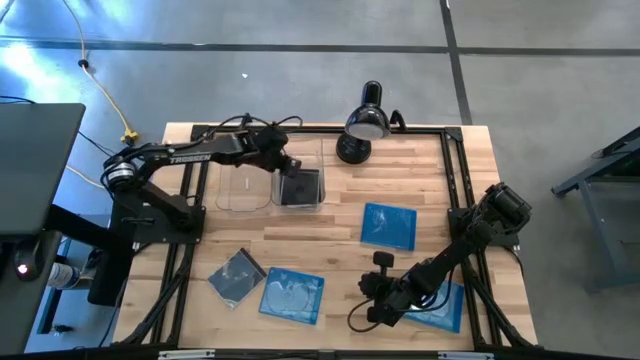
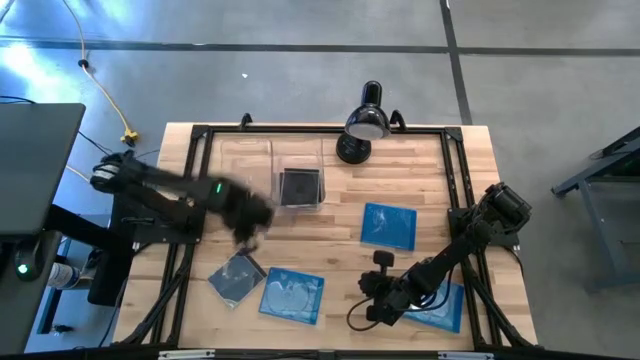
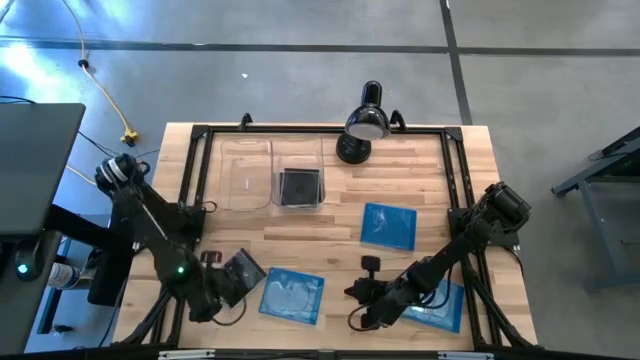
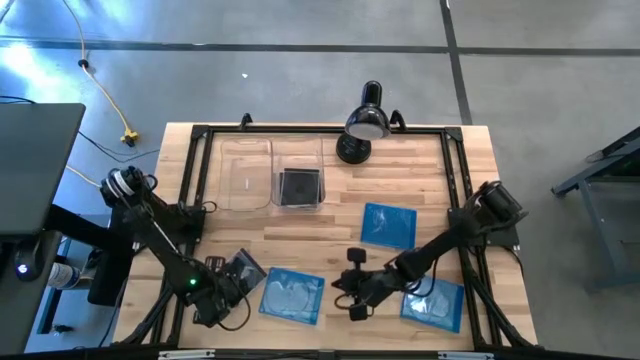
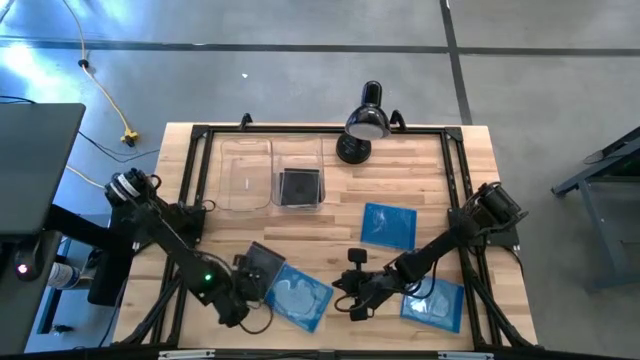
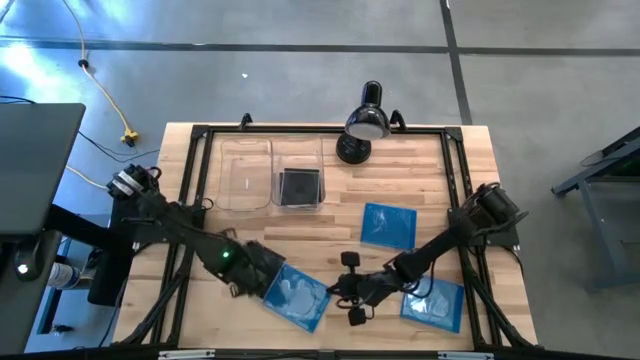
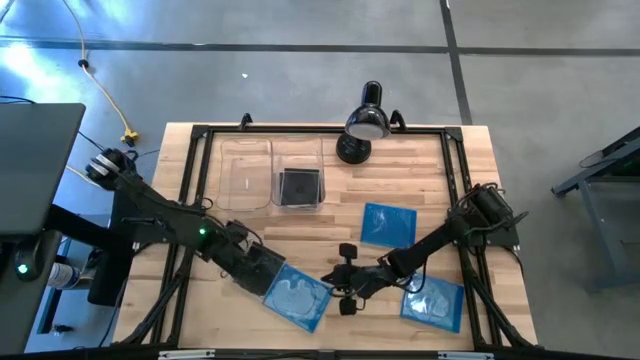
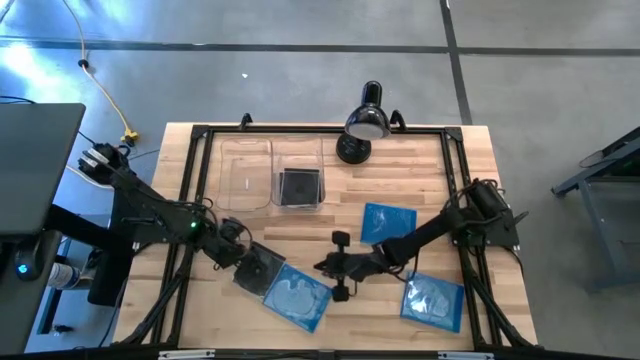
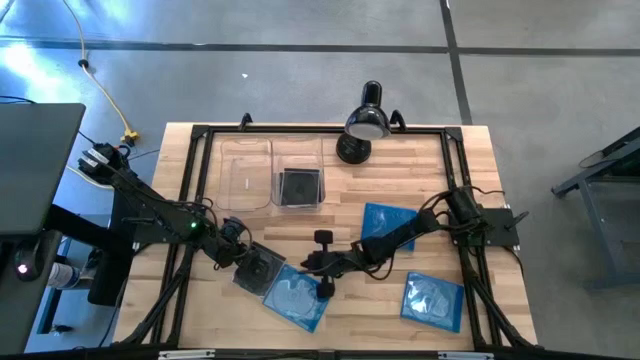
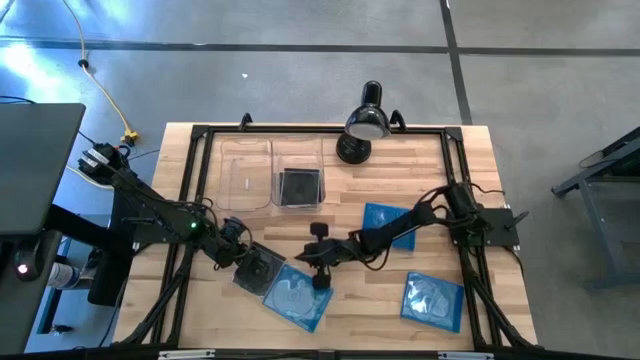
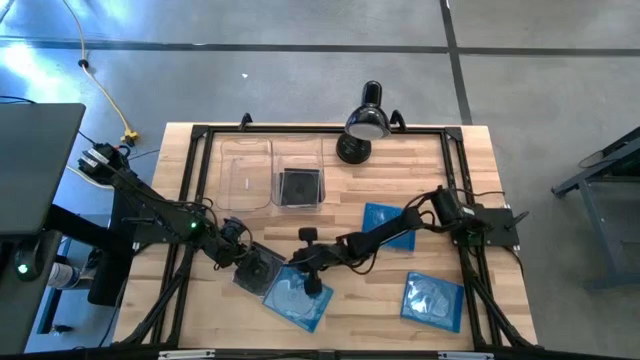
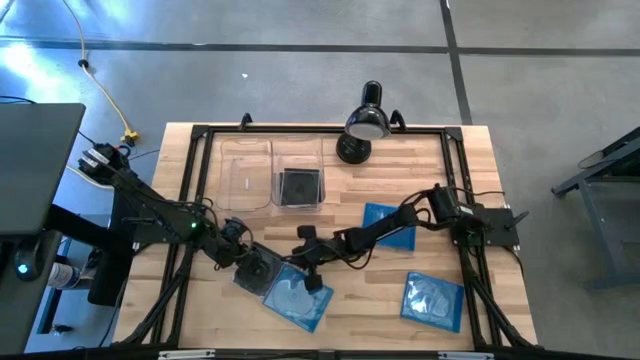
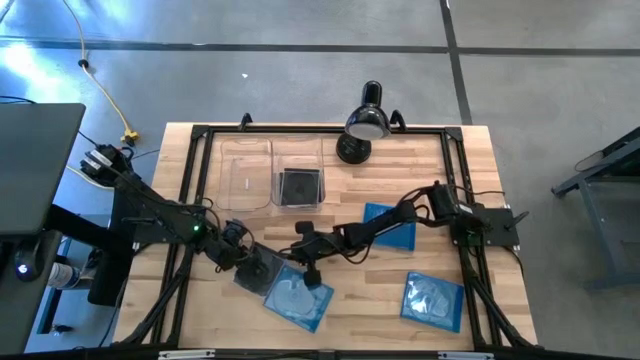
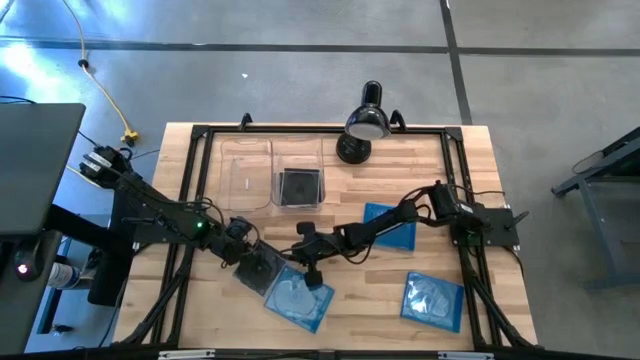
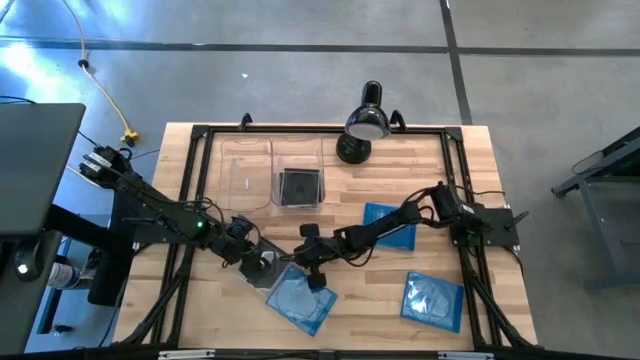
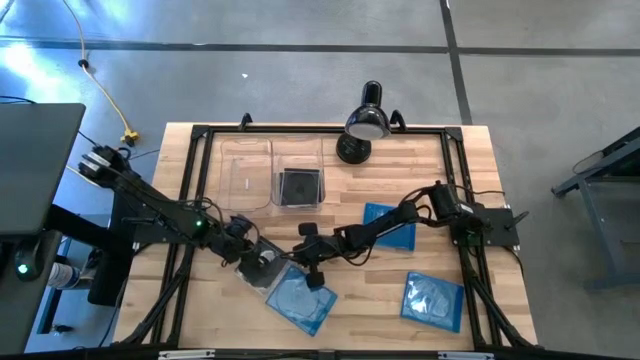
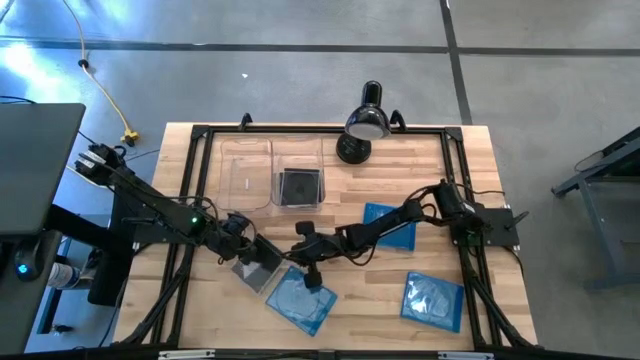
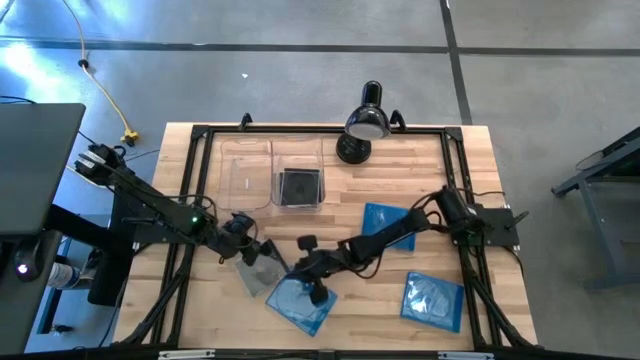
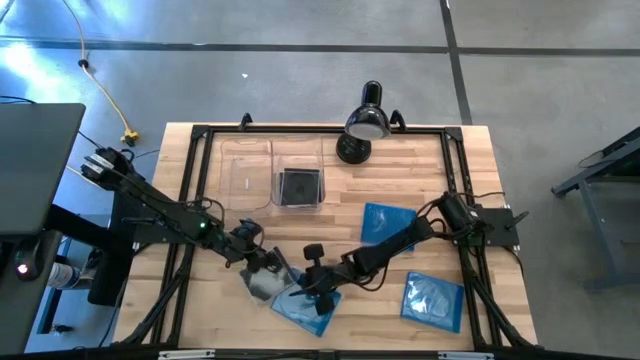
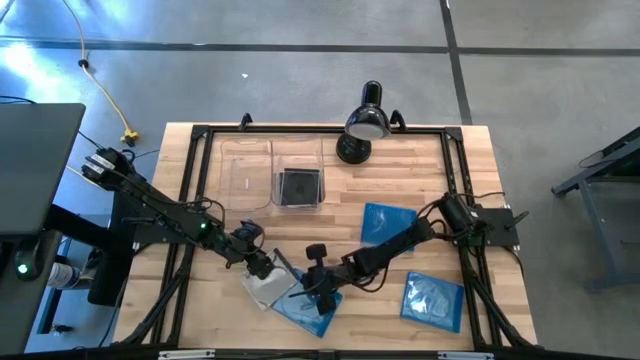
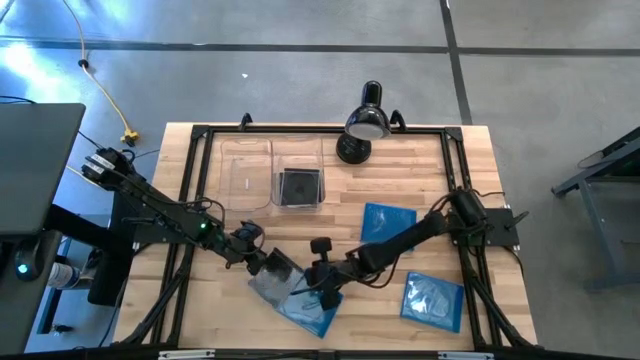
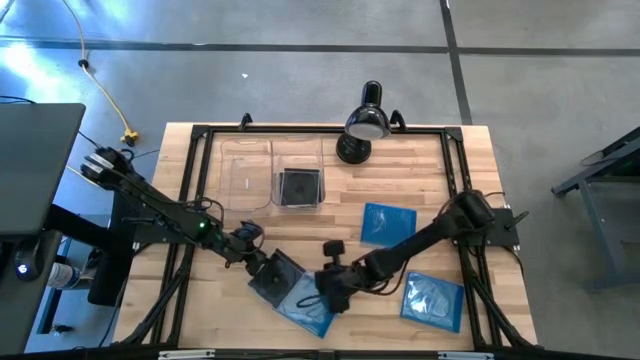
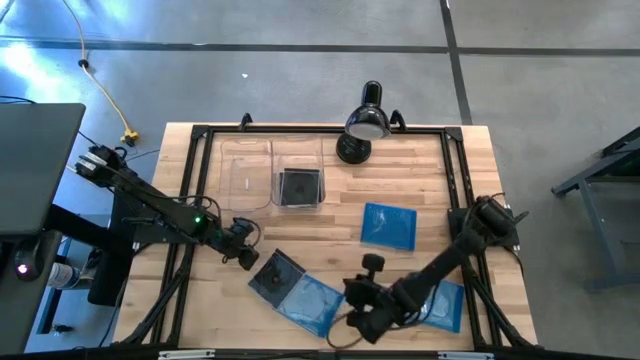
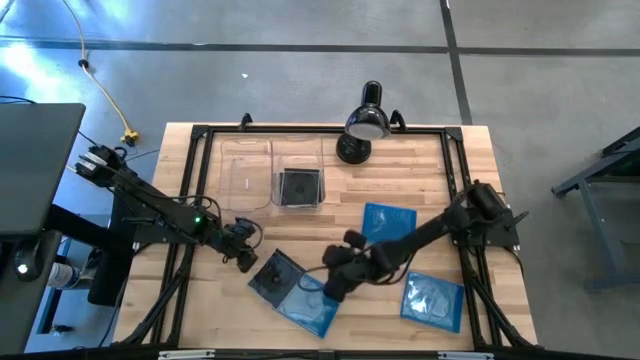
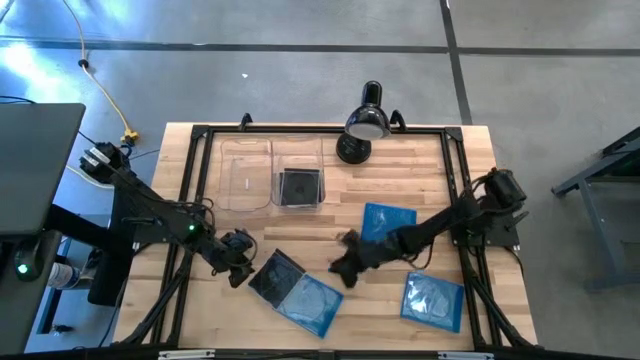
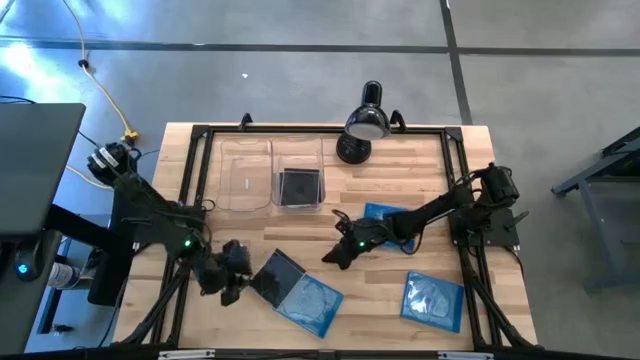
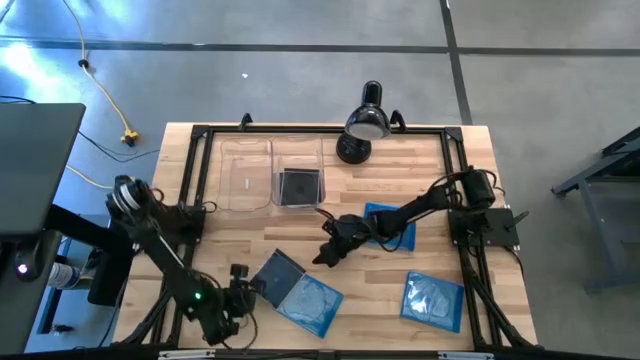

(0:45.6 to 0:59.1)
Task: Pick & place jewel cases by type
Put the black CD case into the right transparent bin

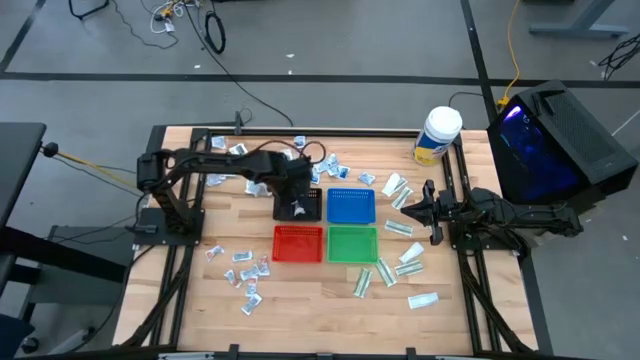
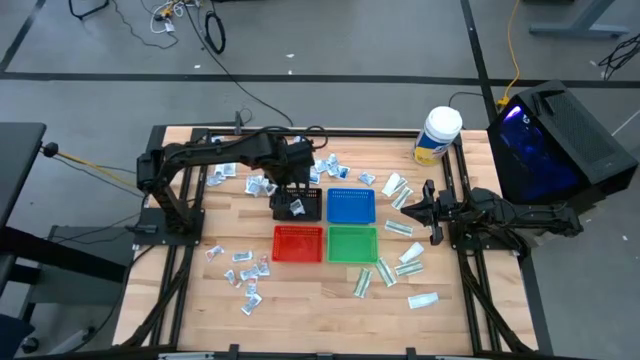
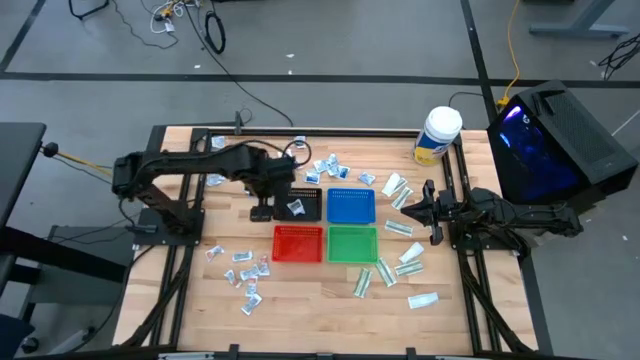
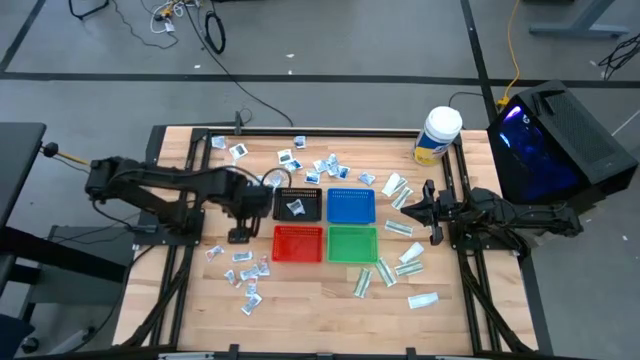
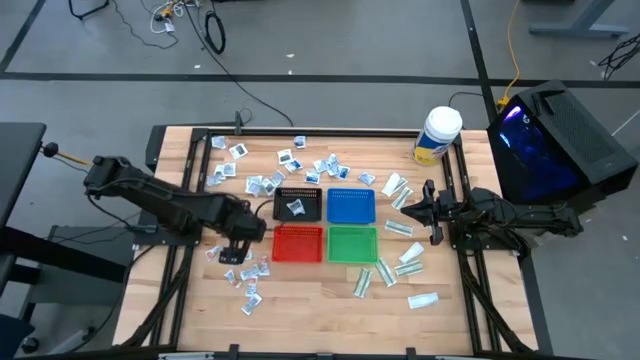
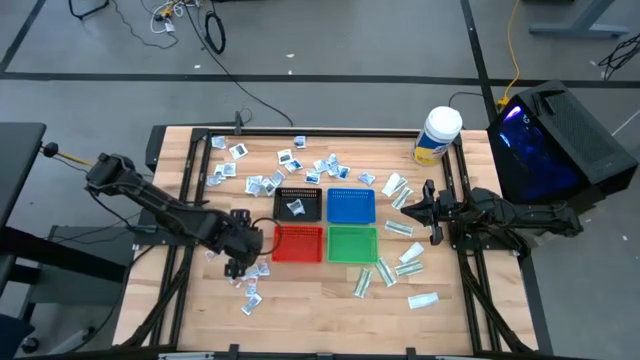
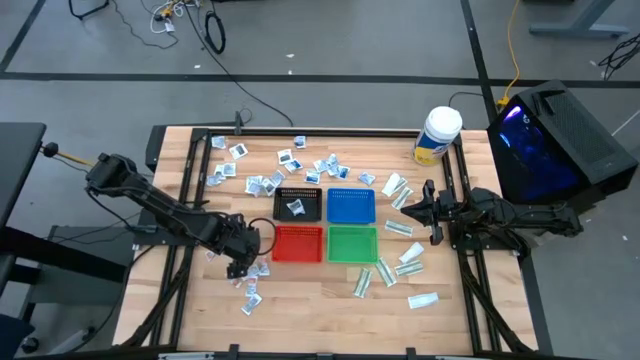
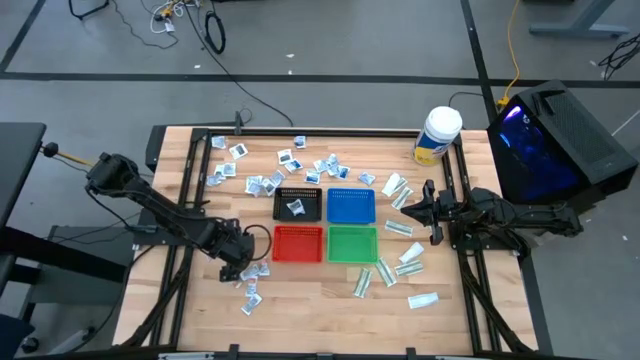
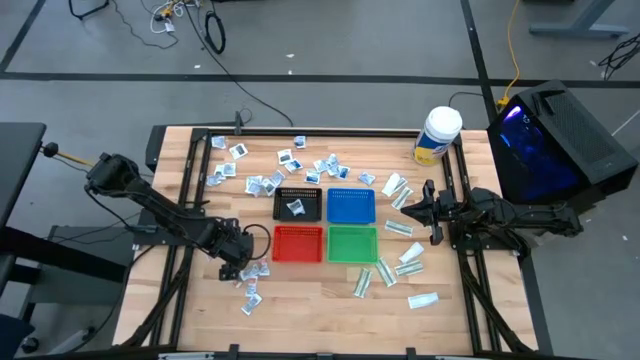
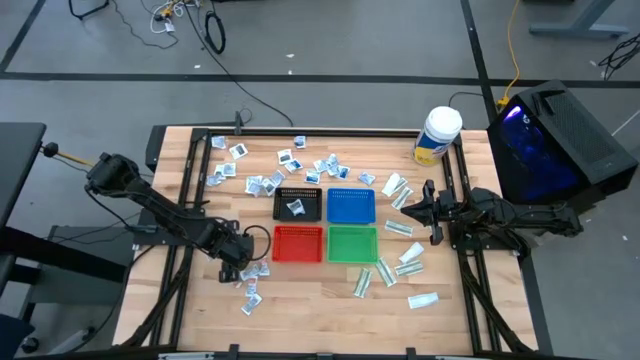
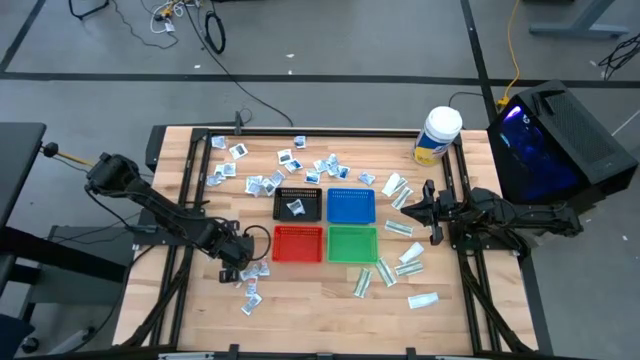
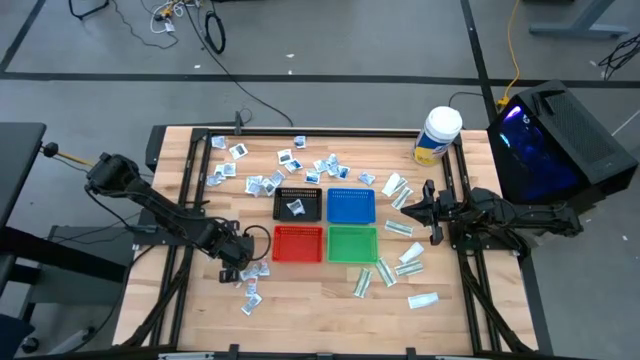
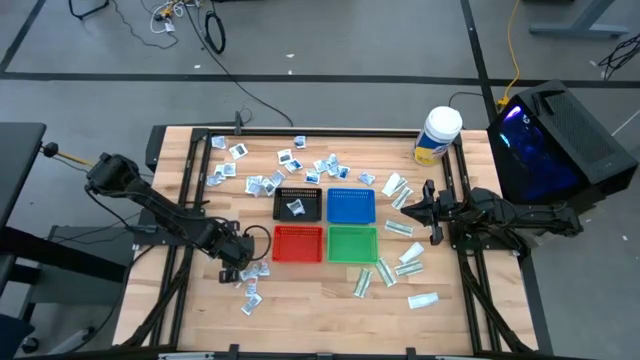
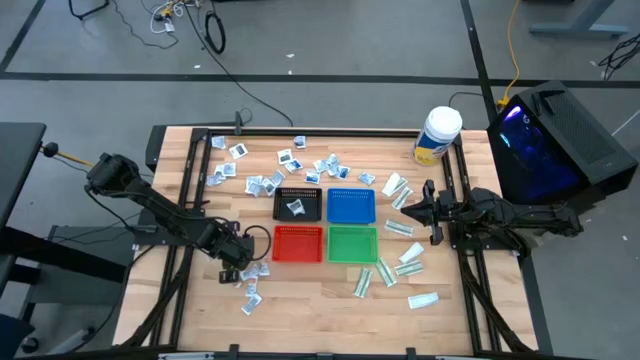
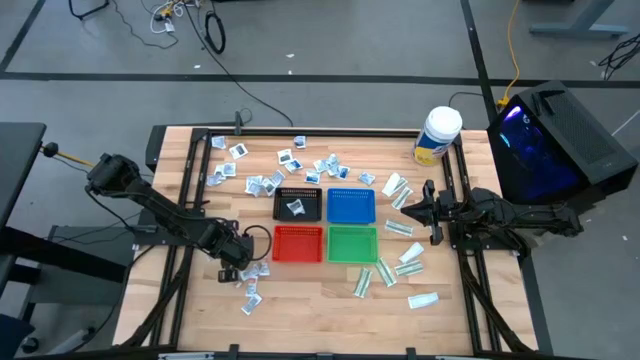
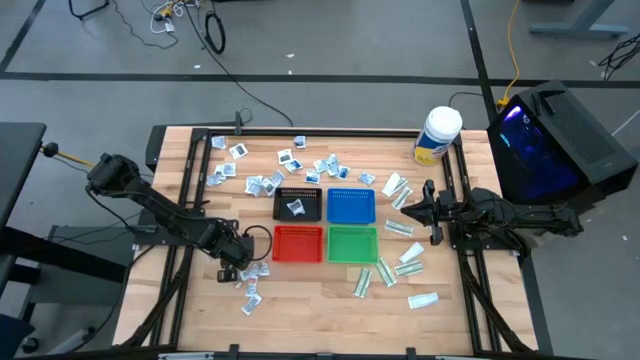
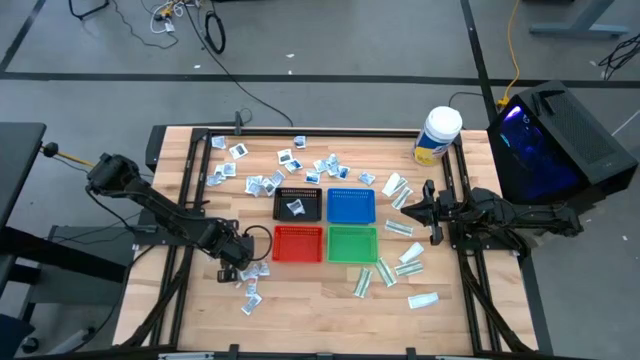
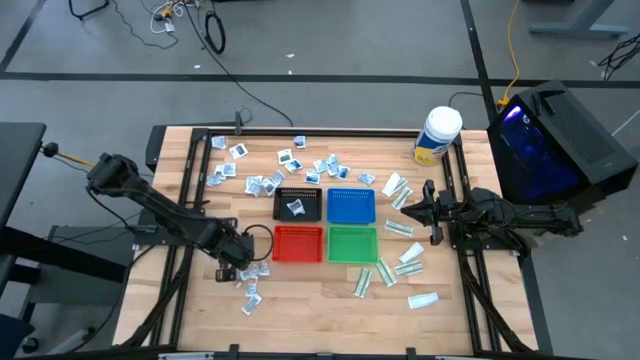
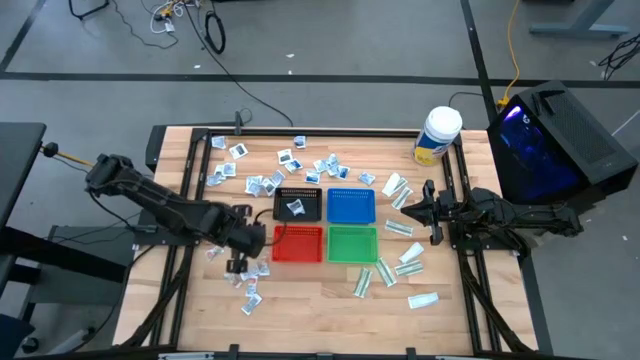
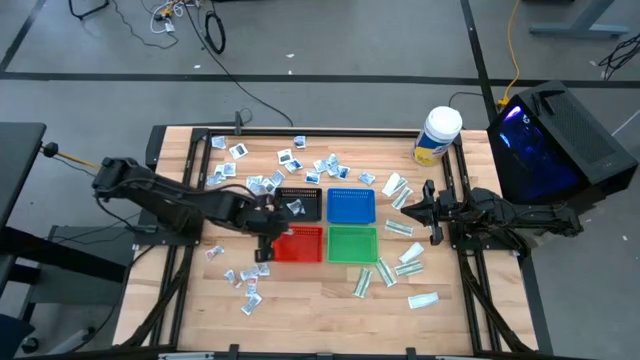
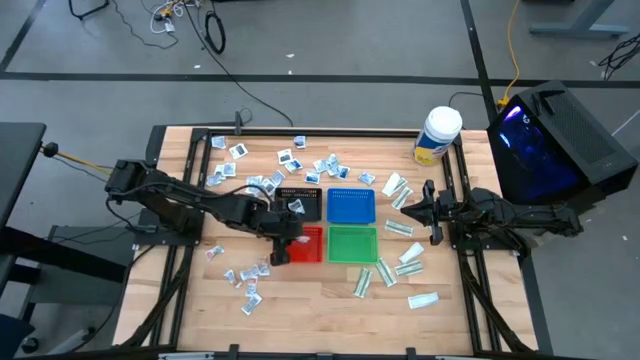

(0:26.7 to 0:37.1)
Task: Pick & Place First Aid Supplies
Put the orange ointment pack into the orange bin
